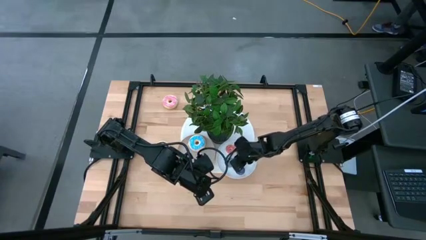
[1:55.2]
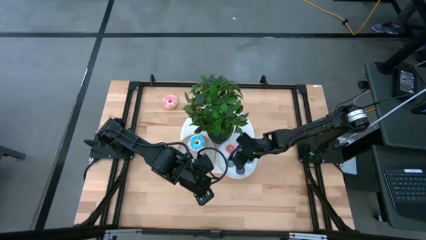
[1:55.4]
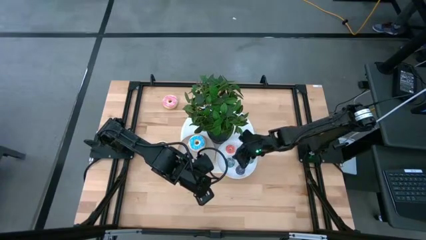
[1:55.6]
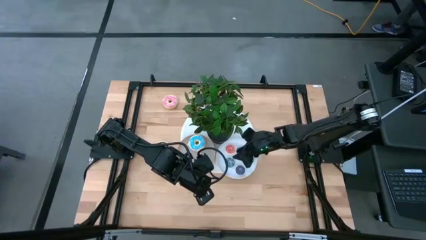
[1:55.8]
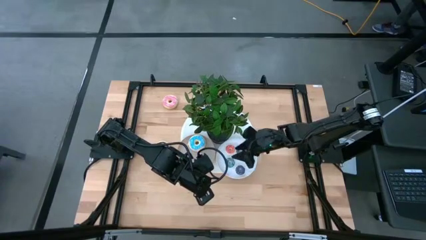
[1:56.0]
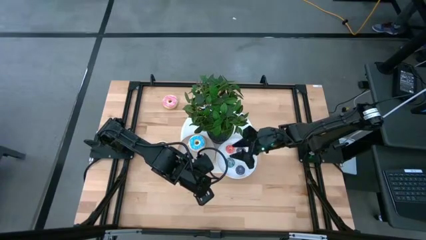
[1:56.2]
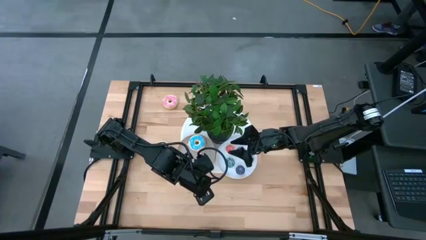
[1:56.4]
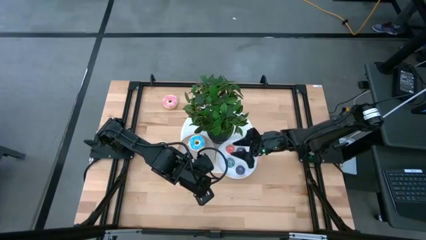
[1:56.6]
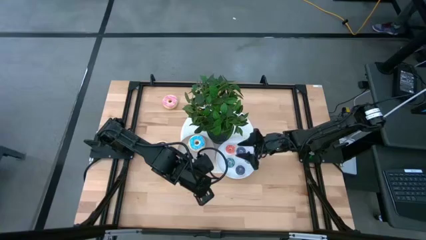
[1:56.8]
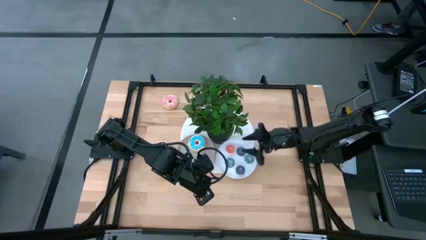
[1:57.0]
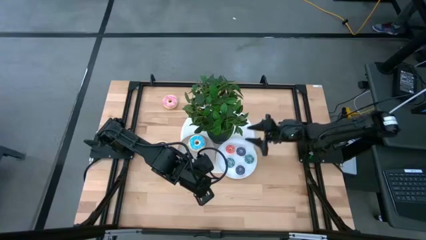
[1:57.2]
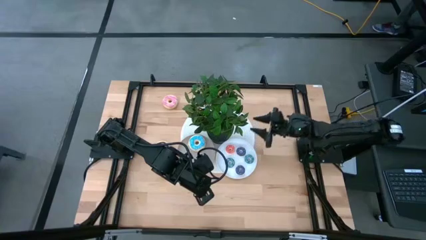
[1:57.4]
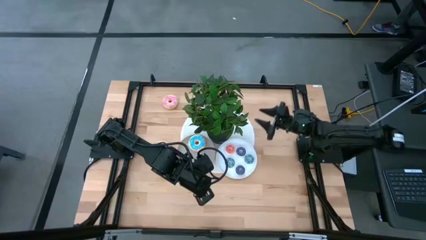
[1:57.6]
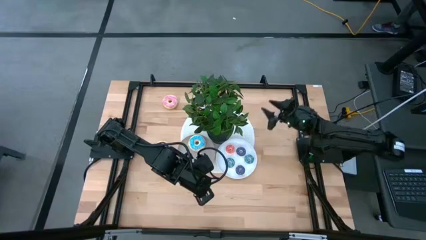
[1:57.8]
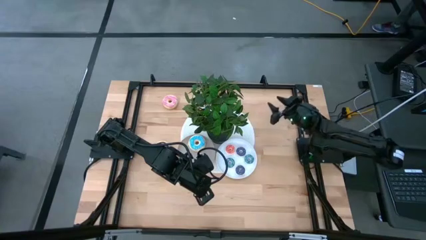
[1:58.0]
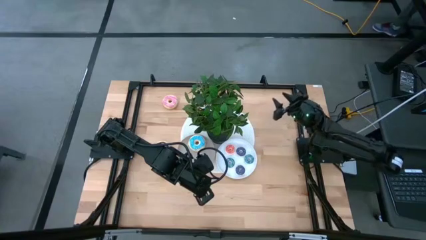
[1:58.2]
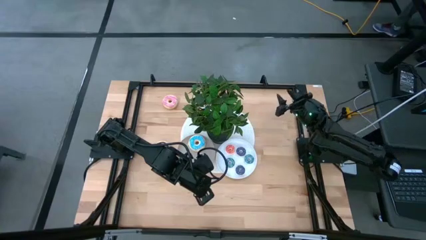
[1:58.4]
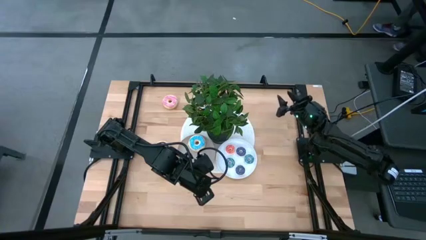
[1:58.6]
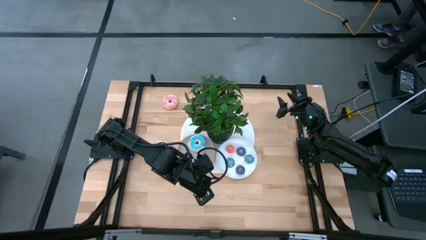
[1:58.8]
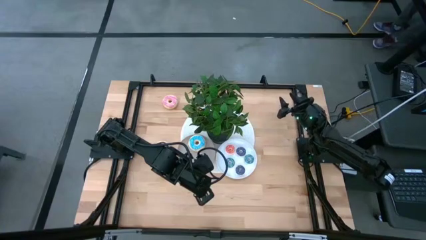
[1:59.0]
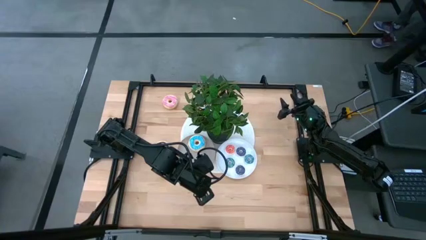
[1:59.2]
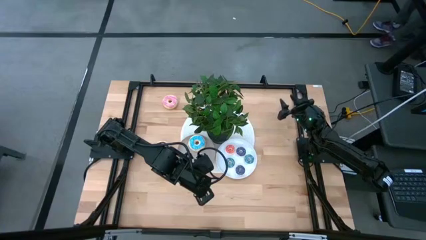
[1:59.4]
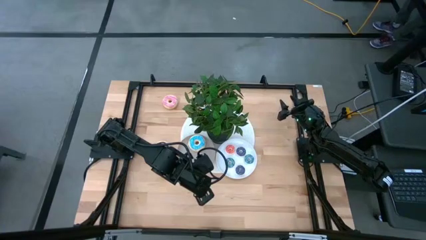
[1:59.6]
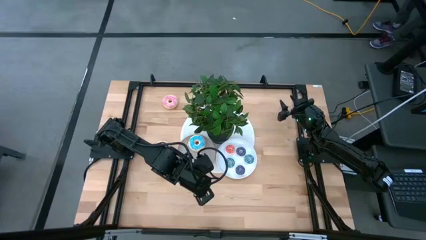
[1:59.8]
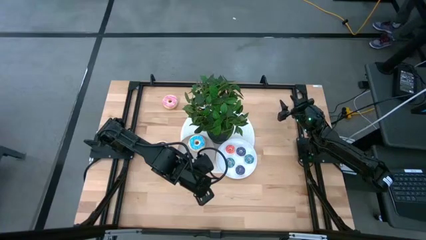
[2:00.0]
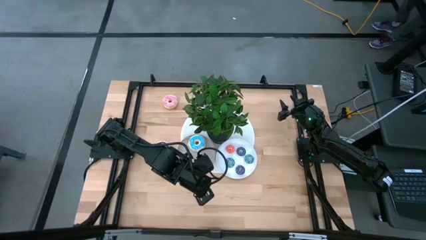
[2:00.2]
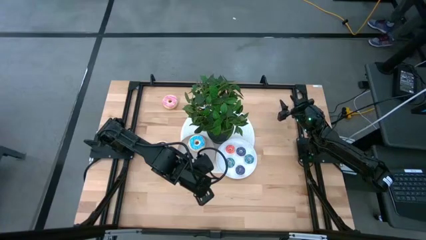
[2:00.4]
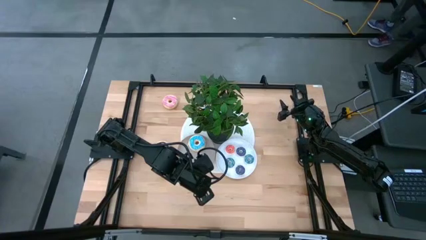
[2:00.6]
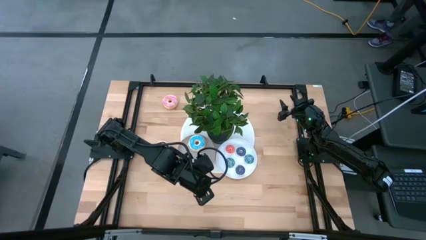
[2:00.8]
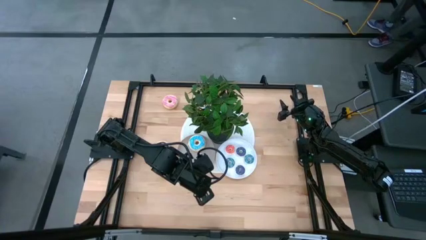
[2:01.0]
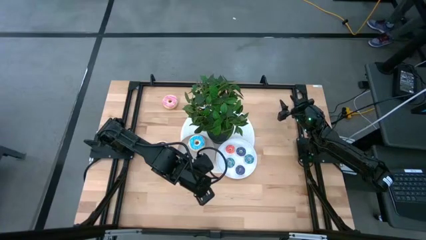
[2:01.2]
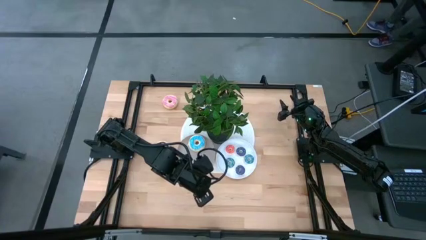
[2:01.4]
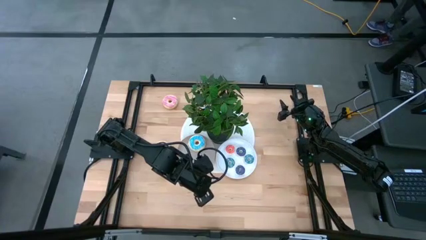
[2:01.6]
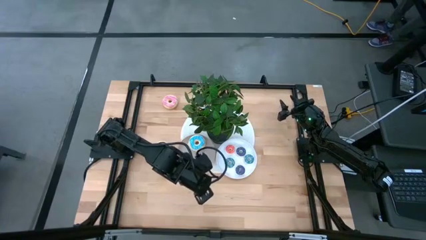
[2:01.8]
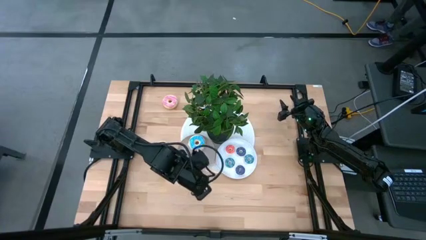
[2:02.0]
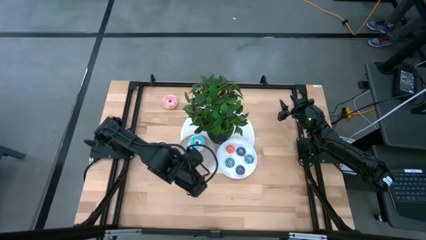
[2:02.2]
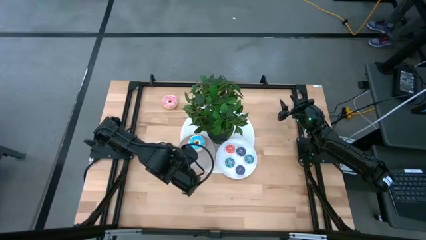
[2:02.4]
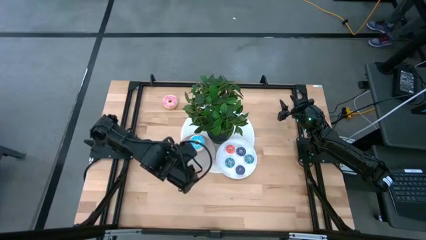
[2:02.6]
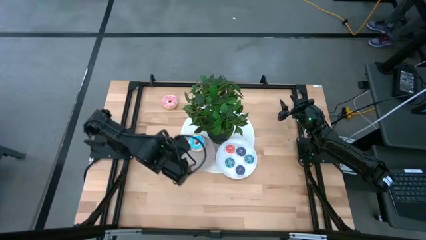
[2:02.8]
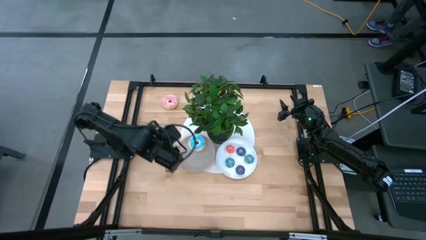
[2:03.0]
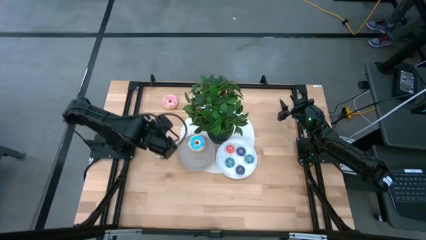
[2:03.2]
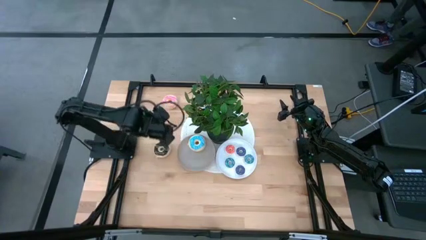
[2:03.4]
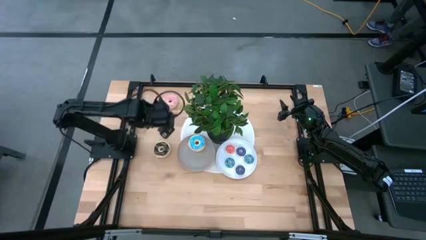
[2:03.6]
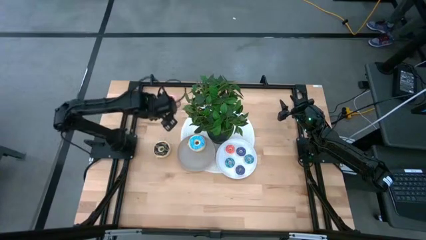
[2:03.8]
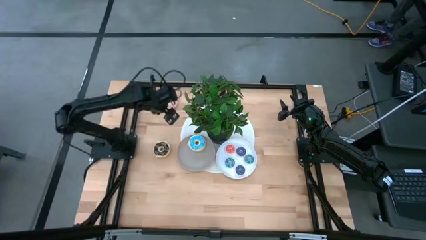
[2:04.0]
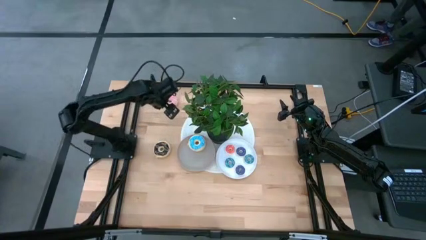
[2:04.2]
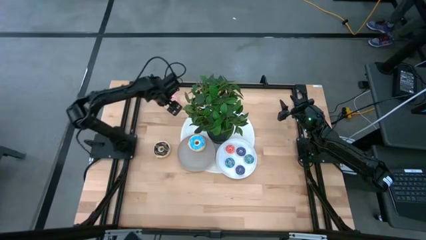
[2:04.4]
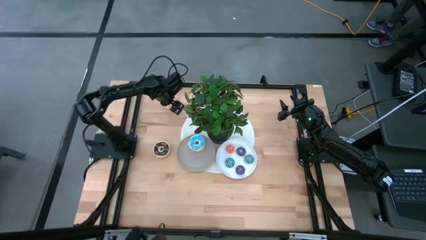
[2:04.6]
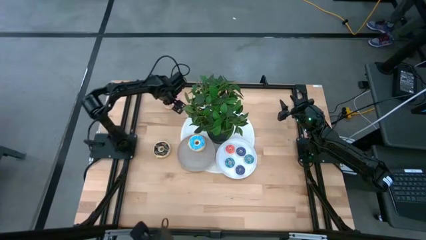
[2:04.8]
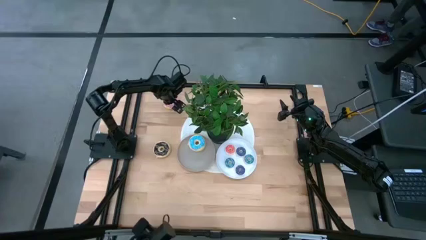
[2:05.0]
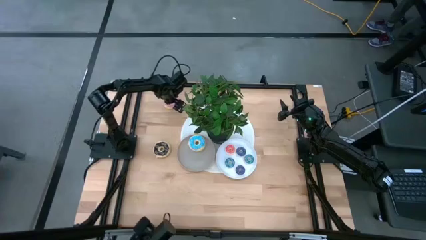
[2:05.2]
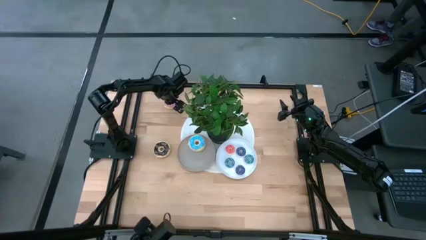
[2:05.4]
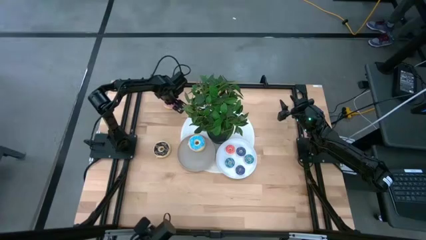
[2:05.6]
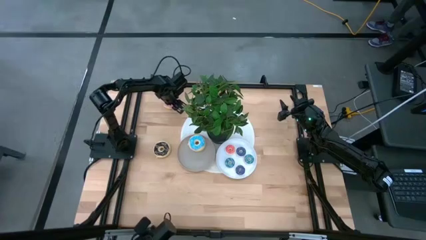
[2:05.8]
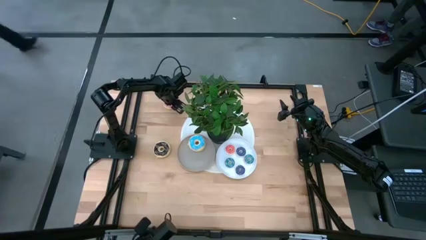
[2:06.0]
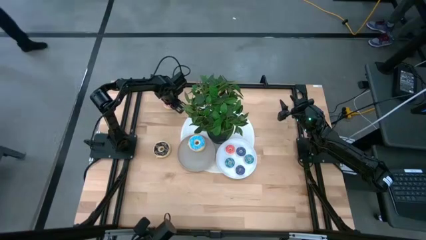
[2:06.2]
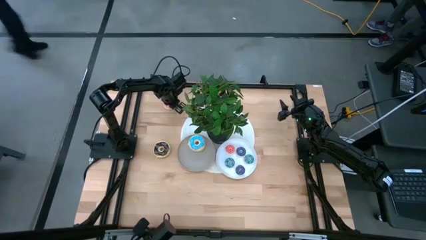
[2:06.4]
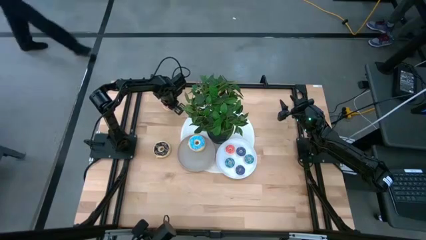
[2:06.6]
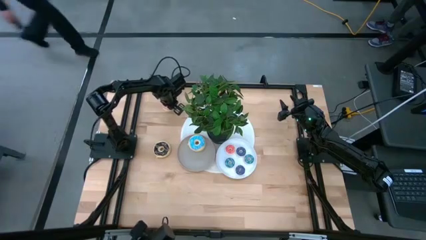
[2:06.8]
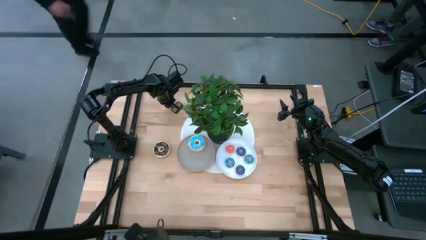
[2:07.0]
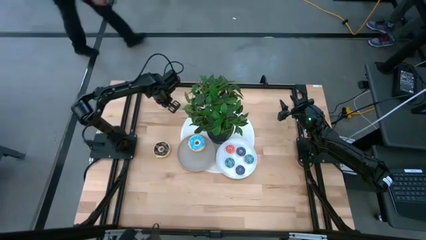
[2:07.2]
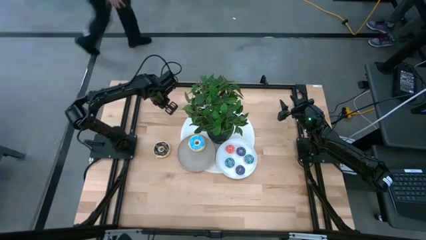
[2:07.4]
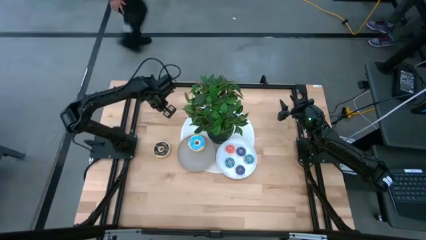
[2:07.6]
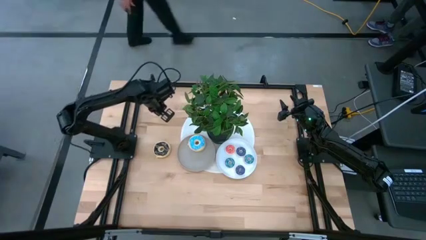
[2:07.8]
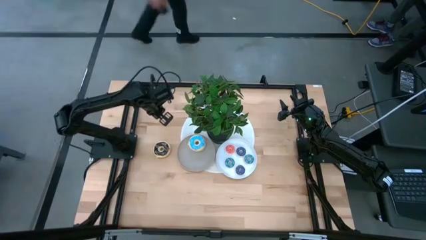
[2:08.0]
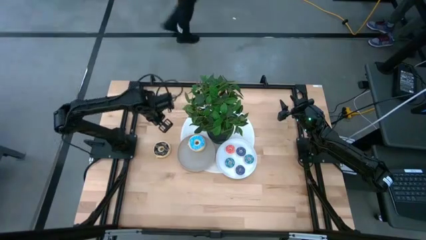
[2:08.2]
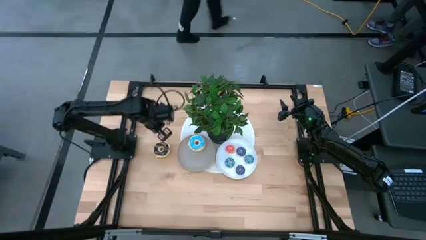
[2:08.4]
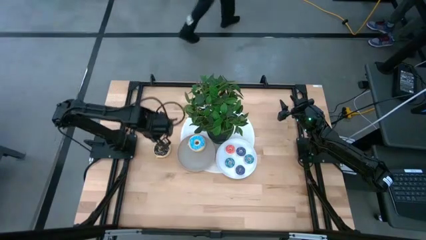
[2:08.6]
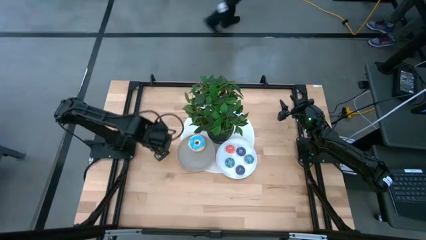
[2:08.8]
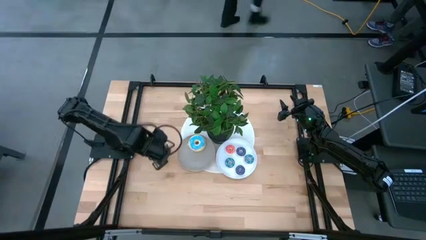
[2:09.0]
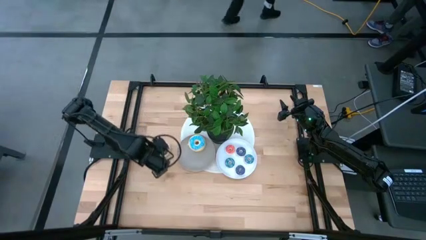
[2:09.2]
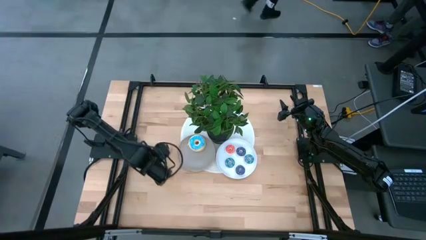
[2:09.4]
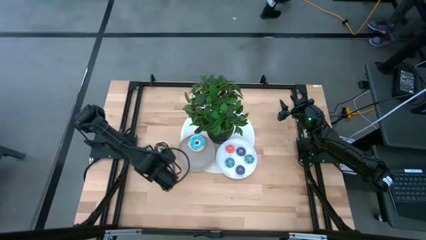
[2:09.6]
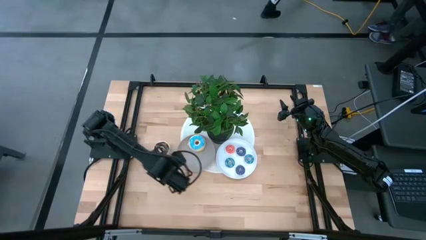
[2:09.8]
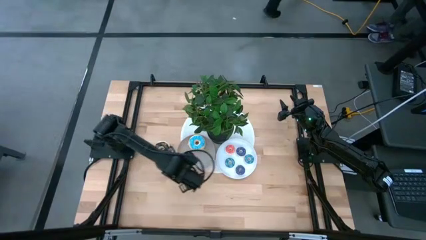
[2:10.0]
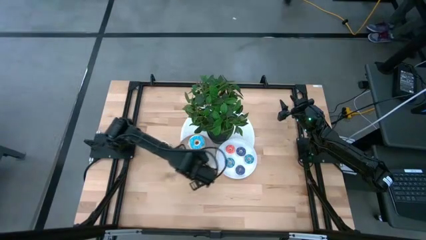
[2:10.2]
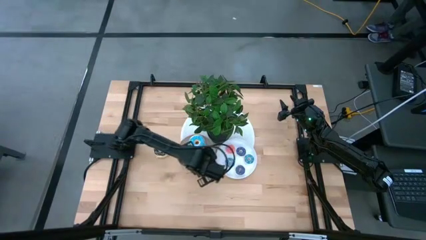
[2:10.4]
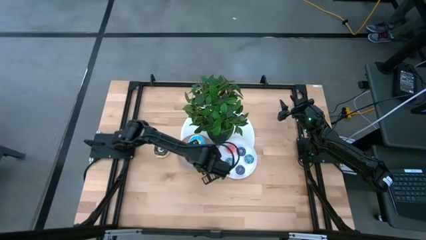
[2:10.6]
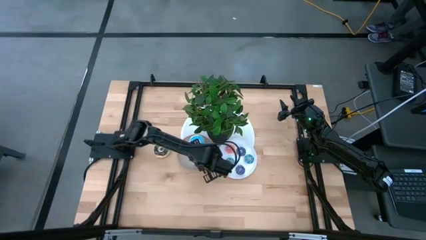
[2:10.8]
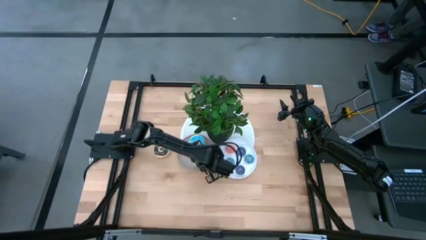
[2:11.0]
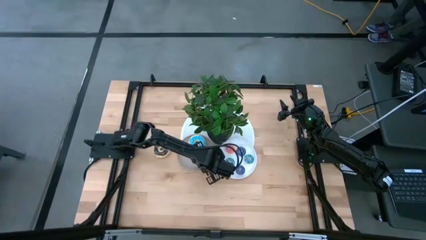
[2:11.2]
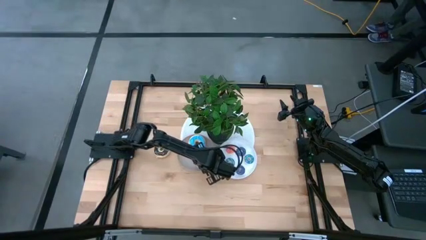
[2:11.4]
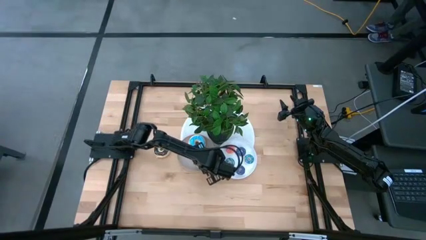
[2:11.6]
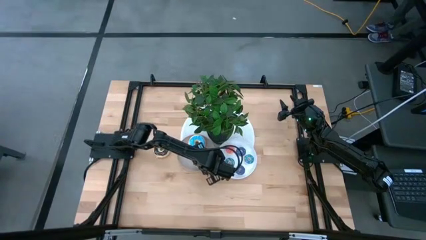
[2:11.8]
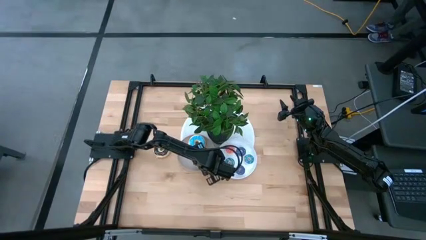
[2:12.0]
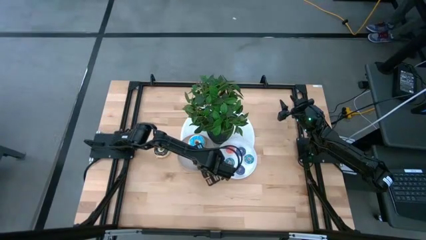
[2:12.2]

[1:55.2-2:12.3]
Task: Pick & Place donuts
Put the large pink donut on the beige plate
